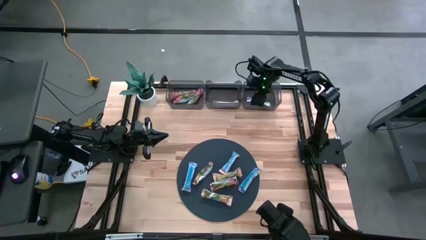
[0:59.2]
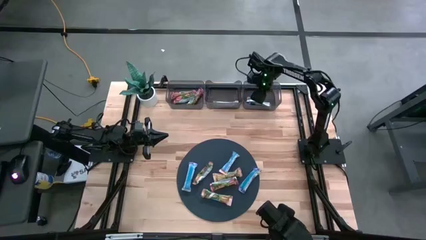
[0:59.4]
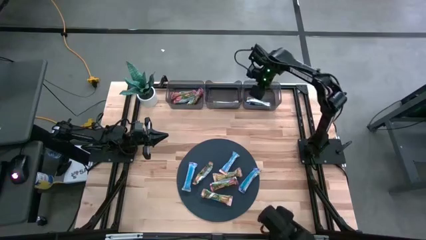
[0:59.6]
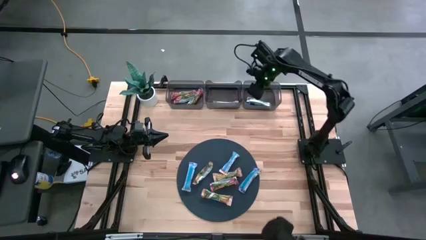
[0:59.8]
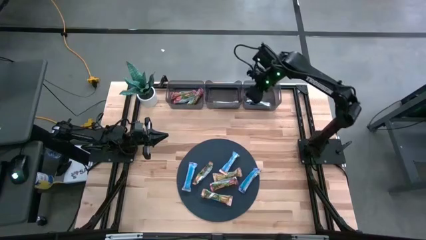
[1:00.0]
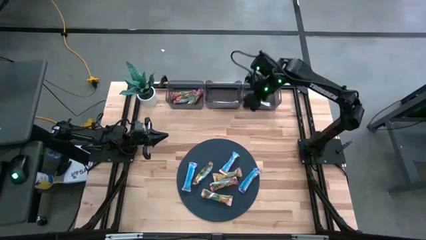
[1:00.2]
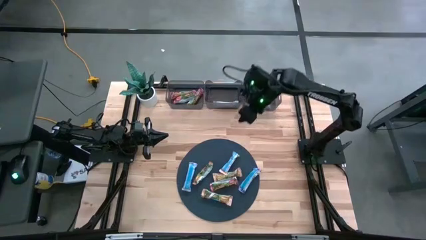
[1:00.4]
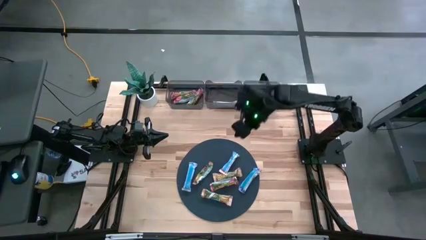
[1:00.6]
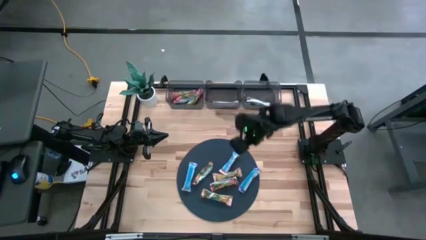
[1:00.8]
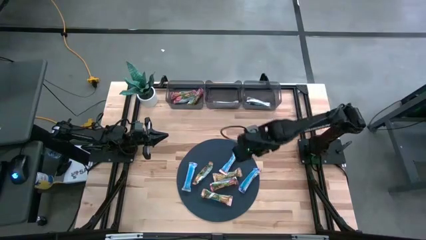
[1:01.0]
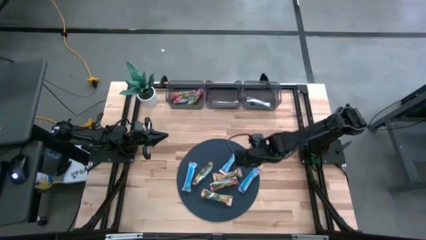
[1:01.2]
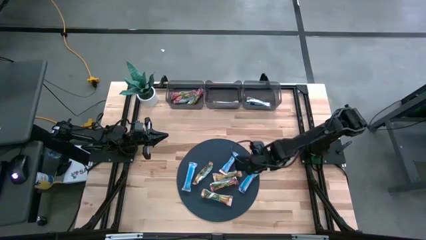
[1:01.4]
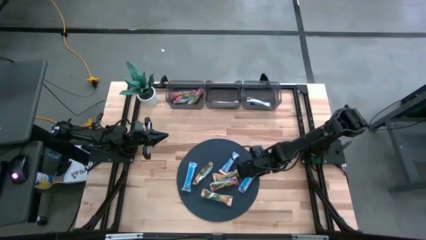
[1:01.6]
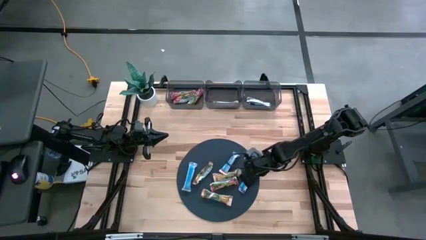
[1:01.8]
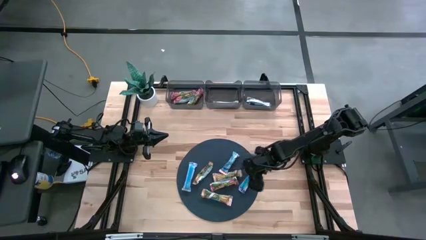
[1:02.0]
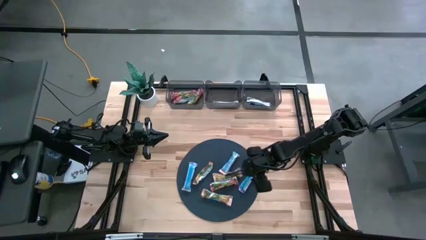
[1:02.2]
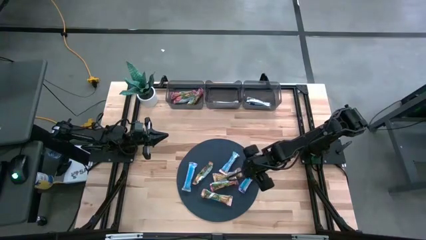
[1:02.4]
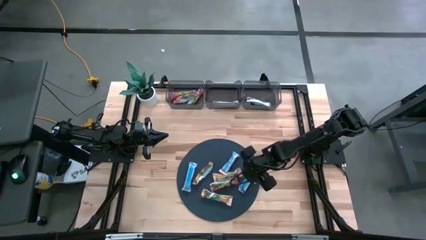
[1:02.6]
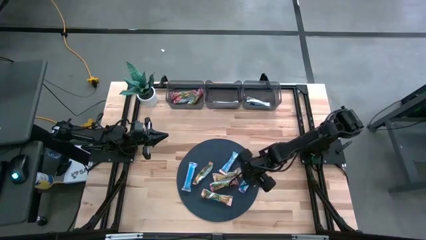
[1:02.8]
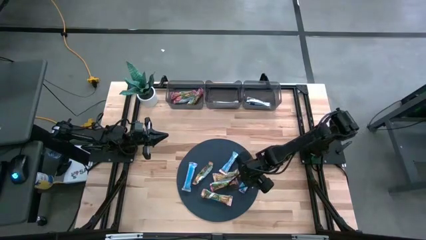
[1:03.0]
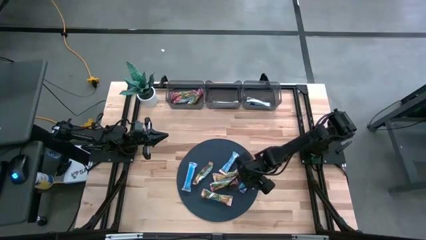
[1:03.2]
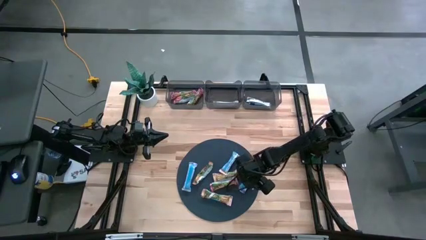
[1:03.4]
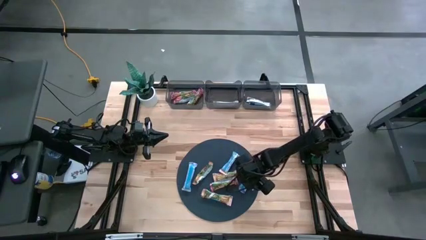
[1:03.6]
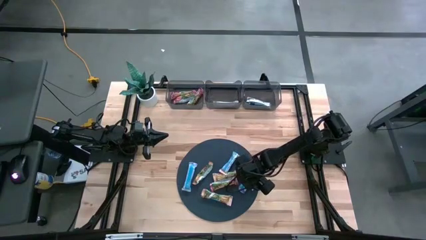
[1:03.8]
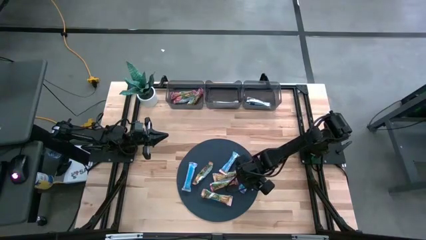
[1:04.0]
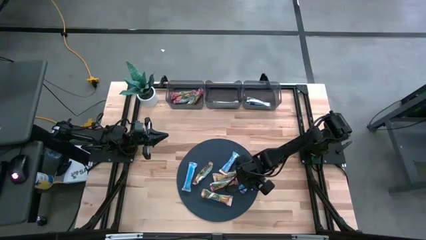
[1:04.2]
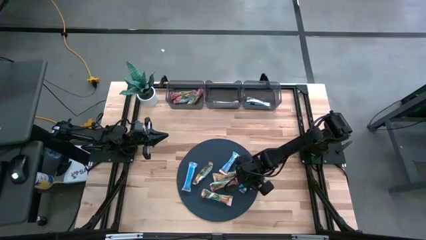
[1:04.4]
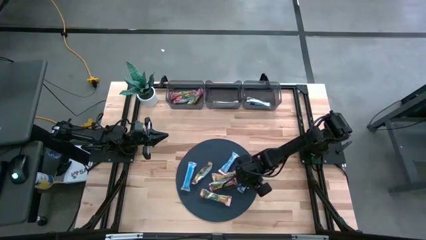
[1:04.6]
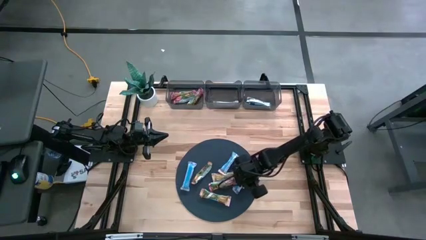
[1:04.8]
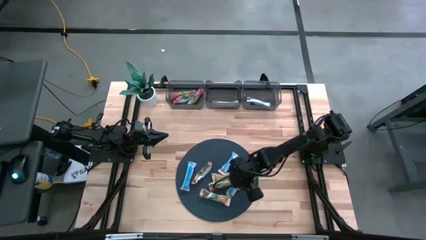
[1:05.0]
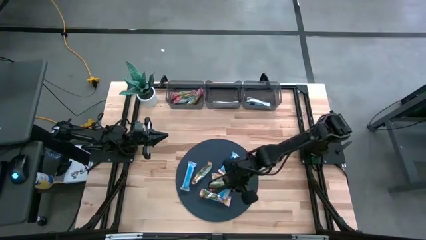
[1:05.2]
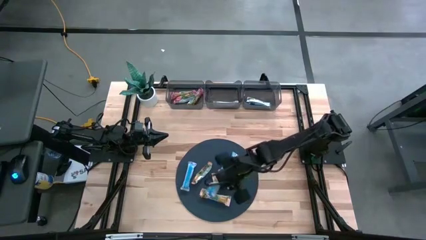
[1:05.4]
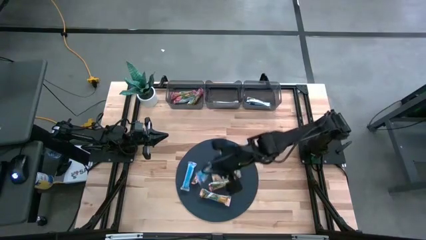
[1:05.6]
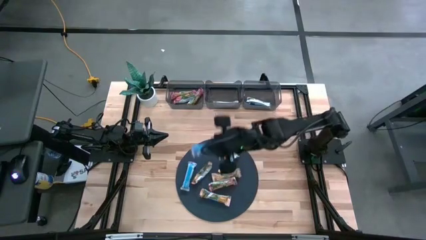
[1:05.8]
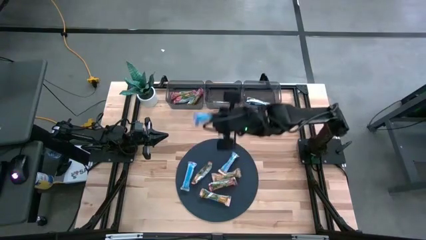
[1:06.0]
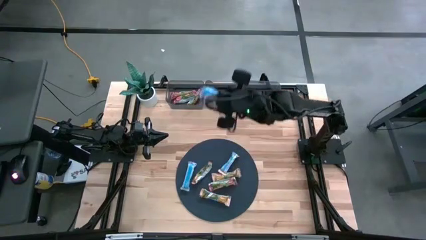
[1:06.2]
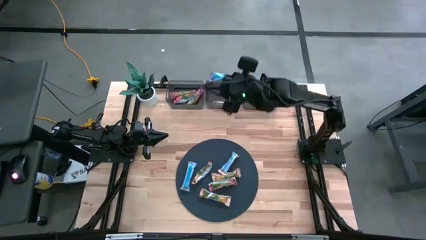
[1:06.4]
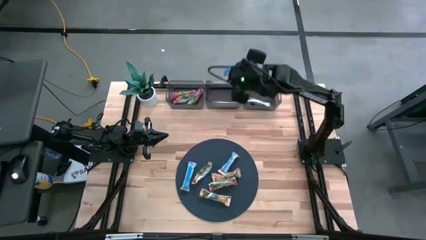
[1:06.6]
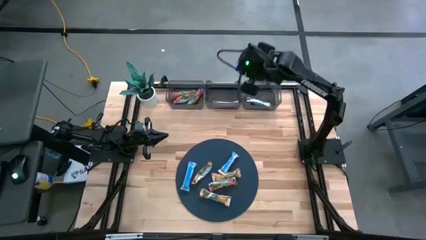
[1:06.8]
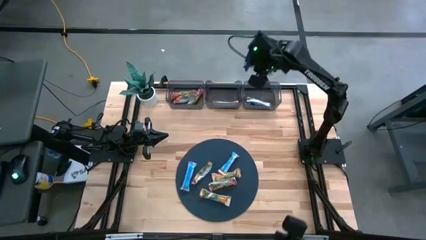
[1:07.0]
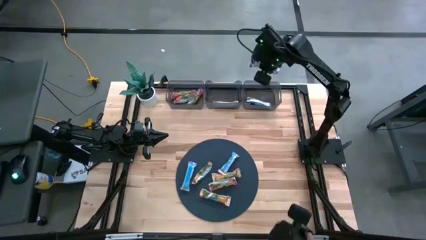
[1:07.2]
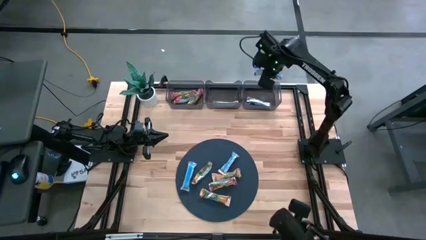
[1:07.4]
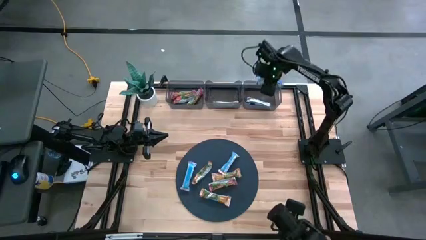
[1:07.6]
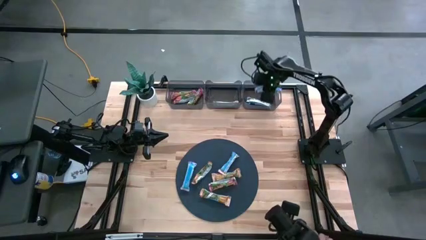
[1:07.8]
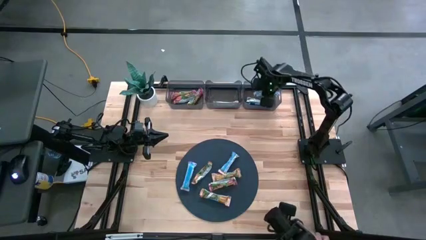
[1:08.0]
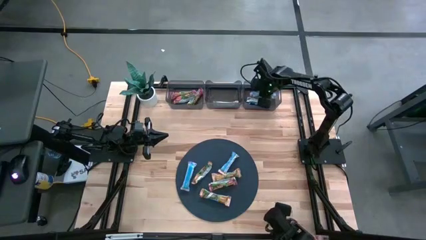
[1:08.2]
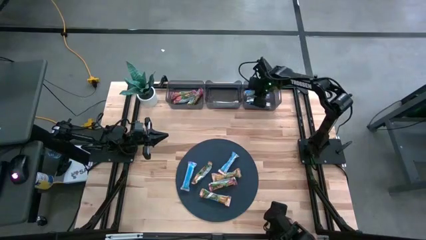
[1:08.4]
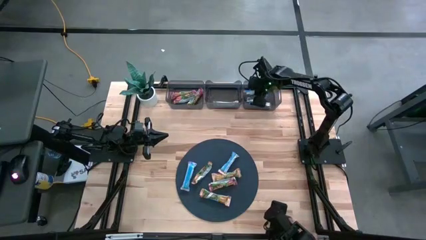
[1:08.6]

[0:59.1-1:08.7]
Task: Pick and place Granola Bars by type
Put the blue granola bar into the right black bin

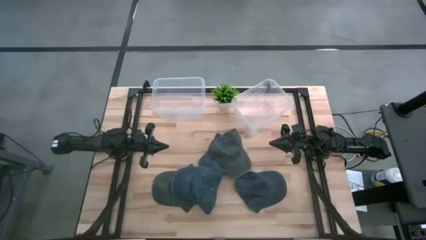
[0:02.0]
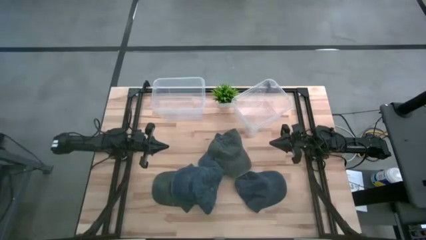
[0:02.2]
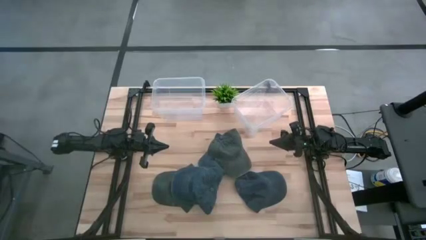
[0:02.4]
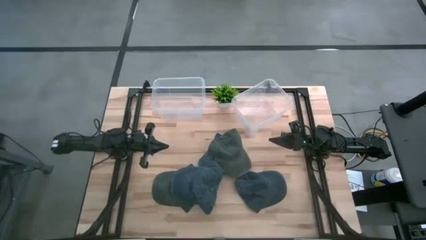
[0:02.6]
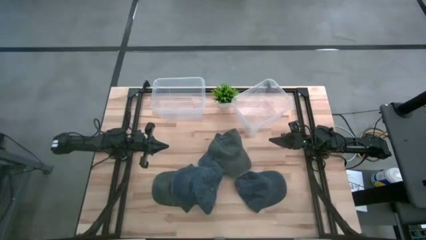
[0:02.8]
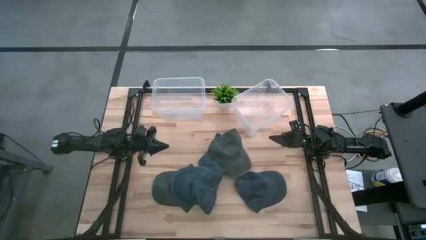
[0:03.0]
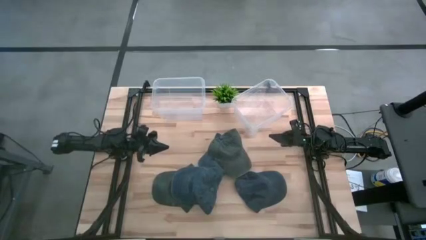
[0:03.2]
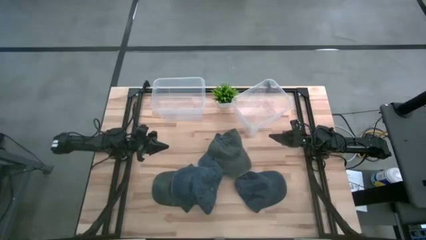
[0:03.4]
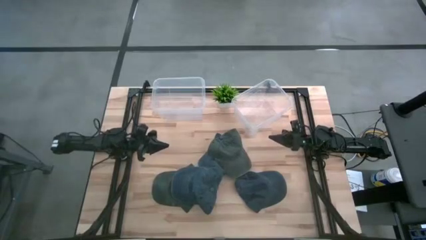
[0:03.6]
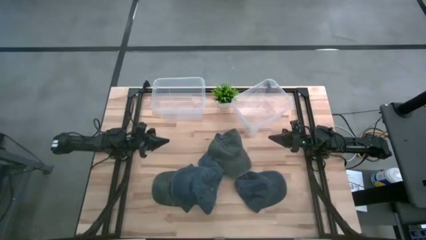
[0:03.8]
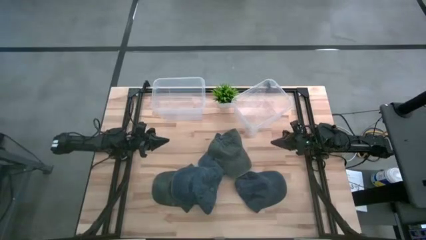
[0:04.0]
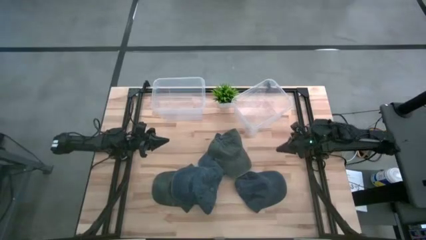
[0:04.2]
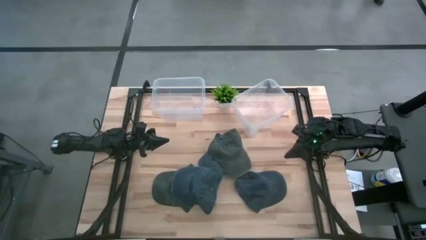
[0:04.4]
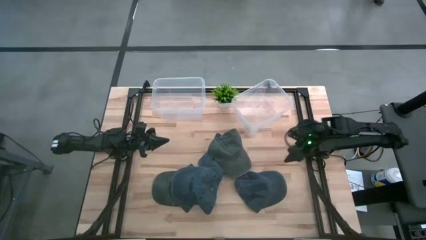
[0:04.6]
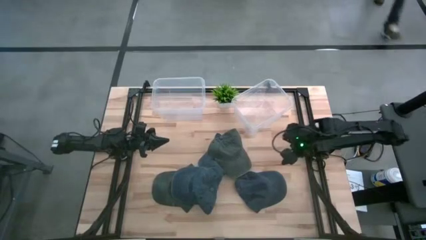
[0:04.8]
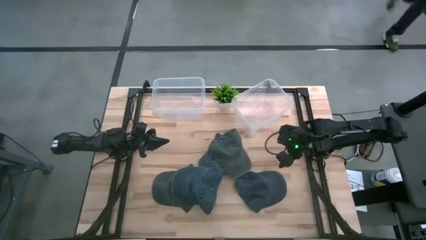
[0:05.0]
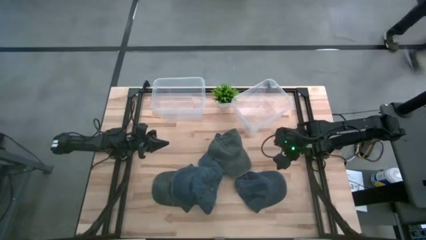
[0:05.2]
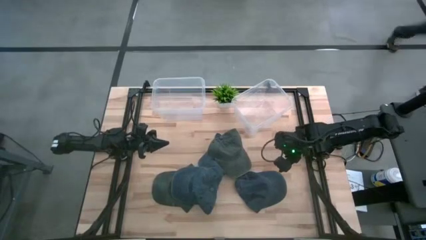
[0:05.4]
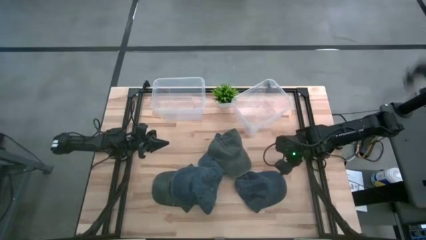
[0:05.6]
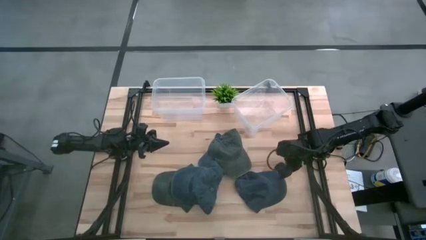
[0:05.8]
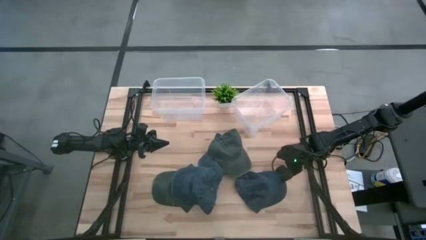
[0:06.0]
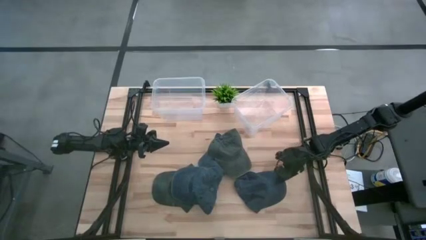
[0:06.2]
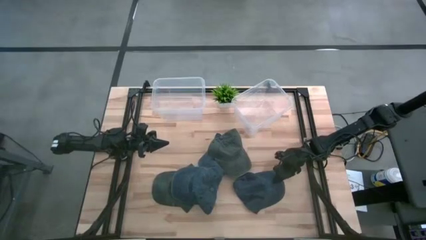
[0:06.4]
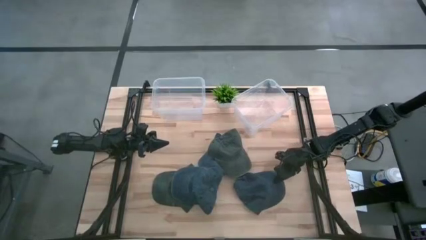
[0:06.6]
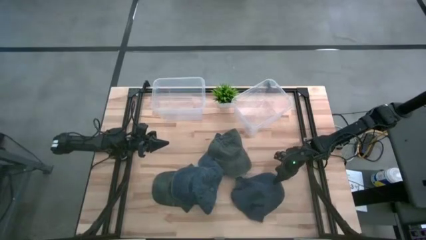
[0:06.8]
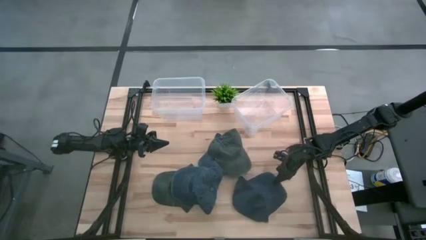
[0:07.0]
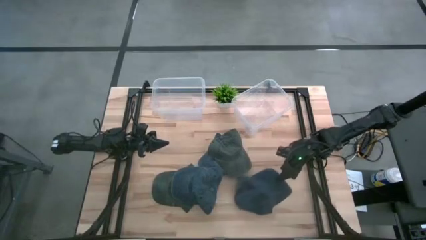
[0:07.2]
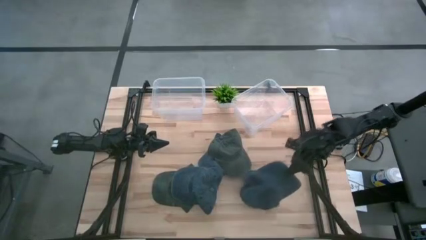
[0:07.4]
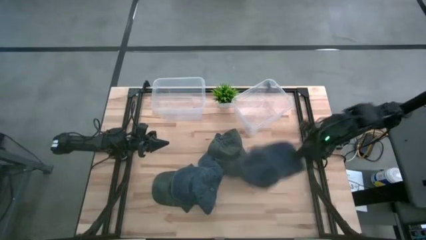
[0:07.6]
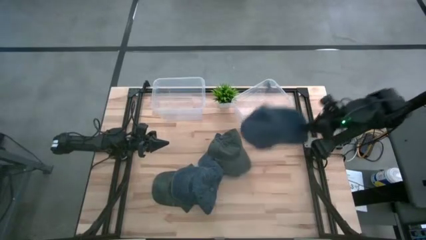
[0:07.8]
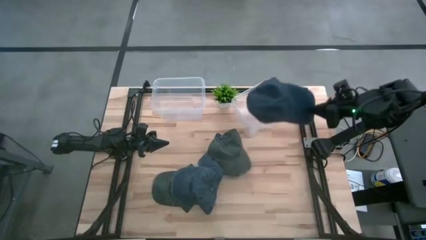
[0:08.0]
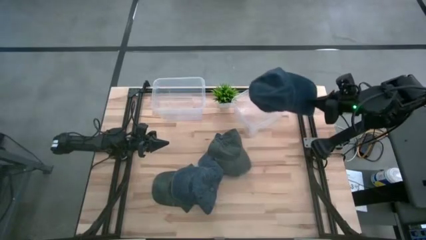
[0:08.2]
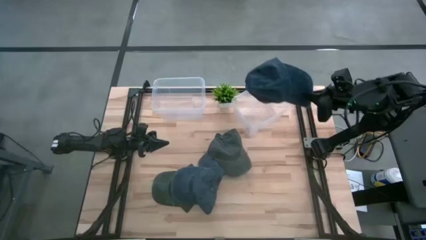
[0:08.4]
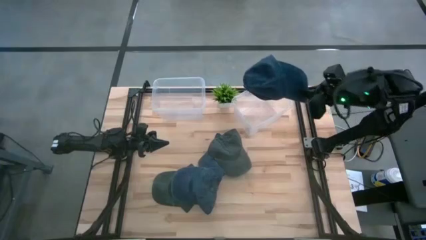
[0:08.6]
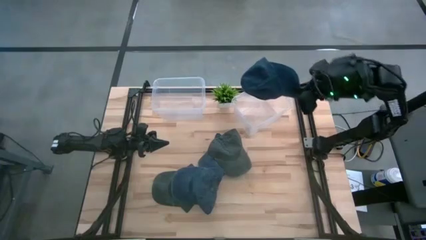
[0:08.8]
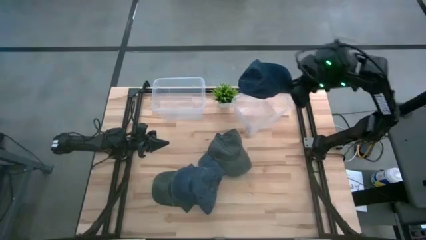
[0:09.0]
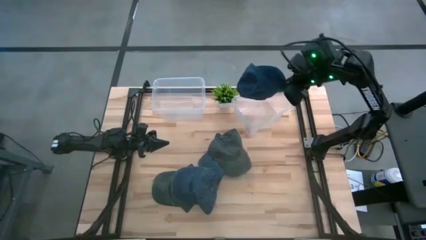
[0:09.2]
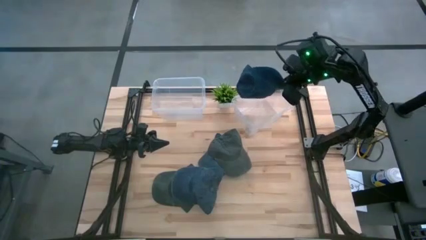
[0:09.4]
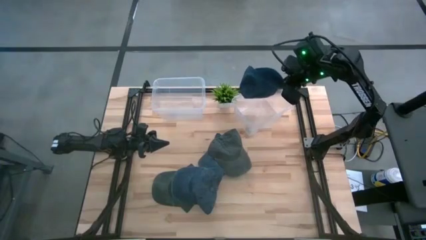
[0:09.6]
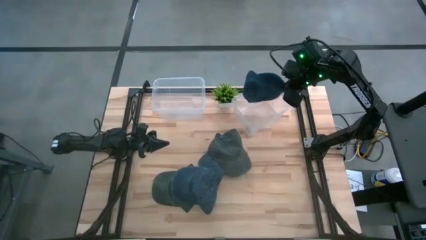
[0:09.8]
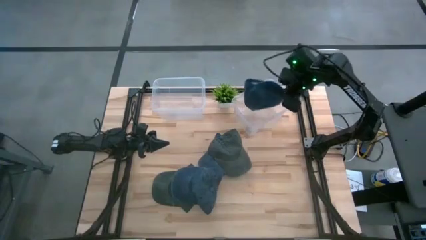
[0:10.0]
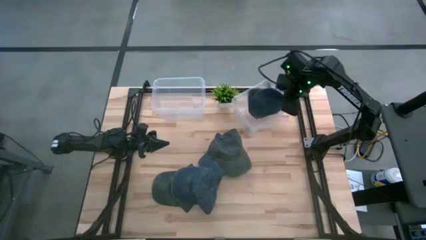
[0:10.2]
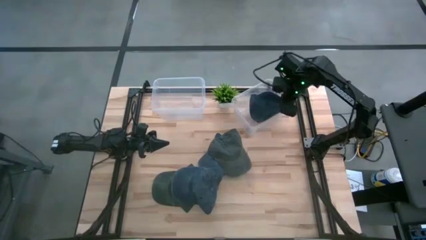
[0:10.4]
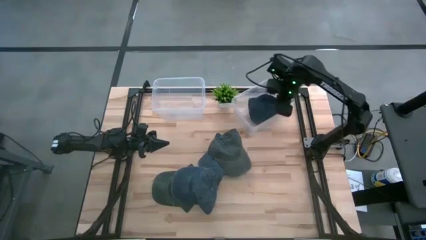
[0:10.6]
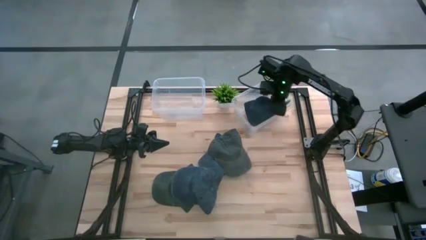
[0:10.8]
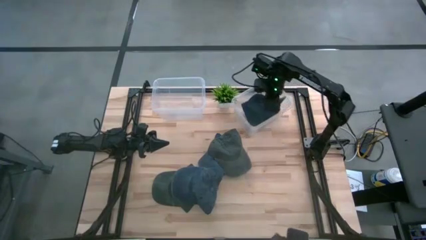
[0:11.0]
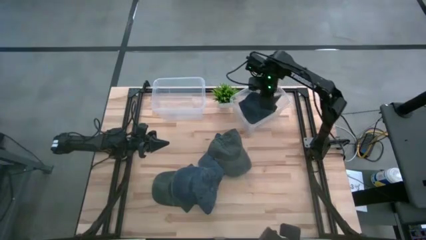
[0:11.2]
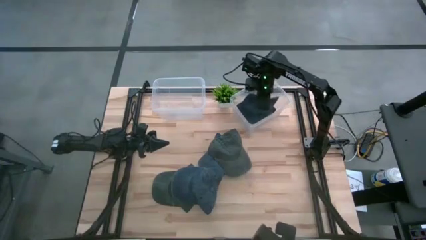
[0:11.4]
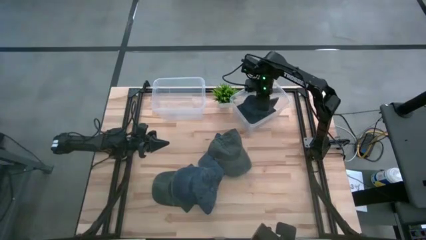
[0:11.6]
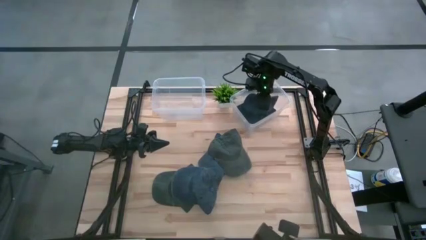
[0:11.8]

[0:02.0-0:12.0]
Task: Pick & Place hat
Put the bottom right blue cap into the right transparent bin
